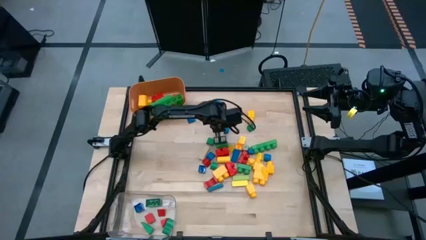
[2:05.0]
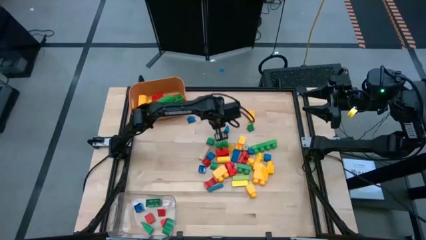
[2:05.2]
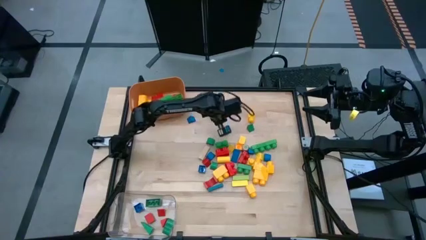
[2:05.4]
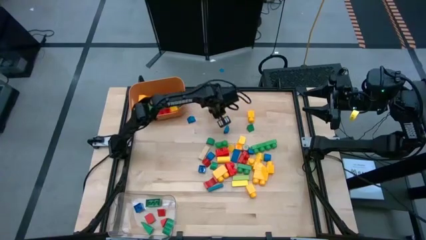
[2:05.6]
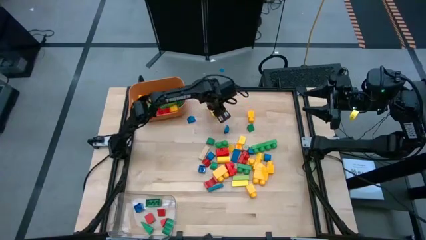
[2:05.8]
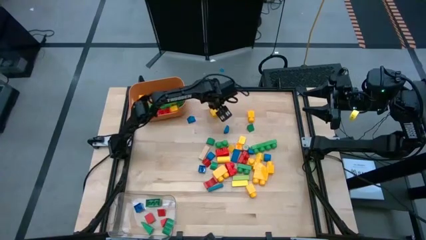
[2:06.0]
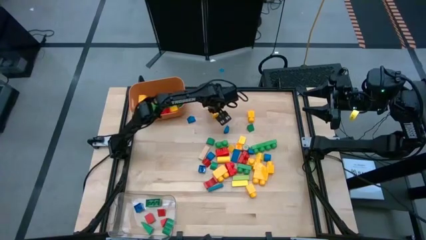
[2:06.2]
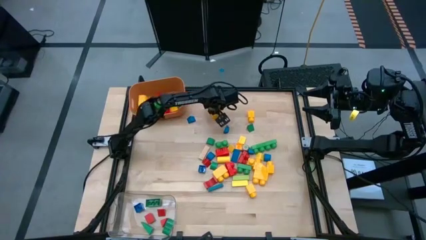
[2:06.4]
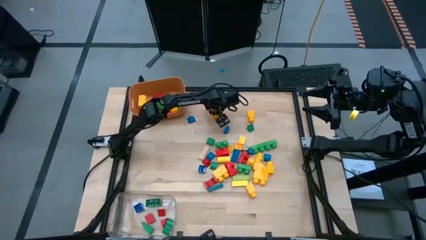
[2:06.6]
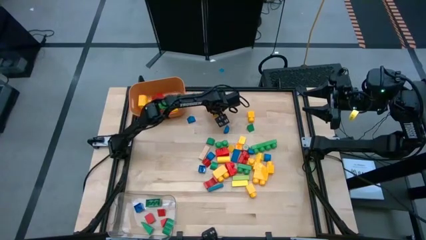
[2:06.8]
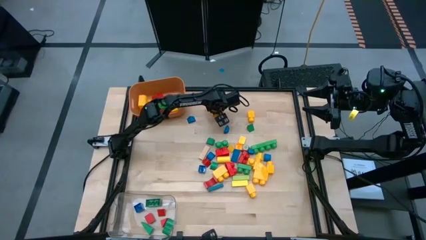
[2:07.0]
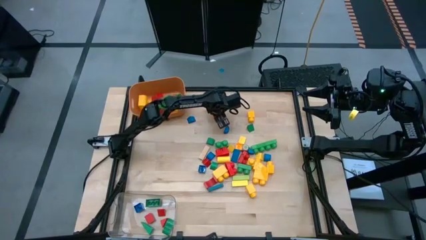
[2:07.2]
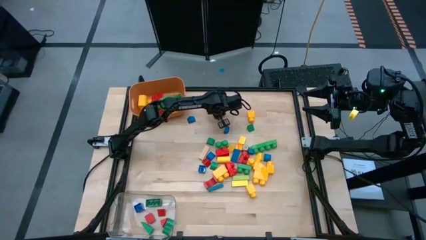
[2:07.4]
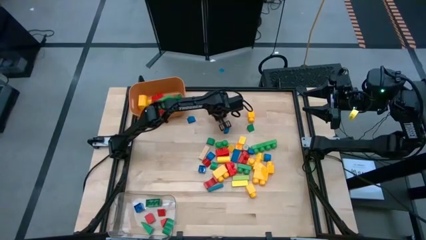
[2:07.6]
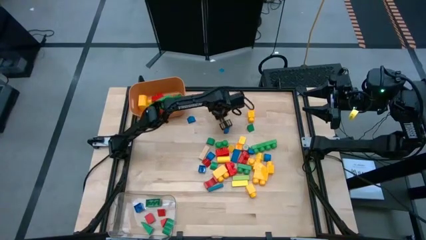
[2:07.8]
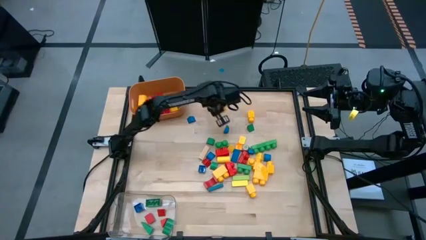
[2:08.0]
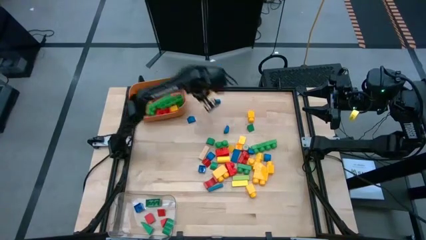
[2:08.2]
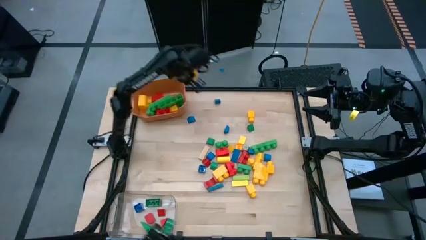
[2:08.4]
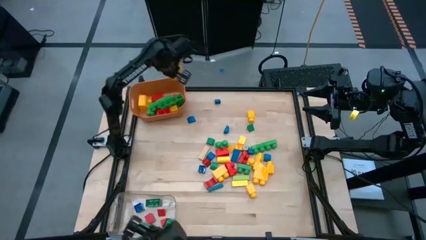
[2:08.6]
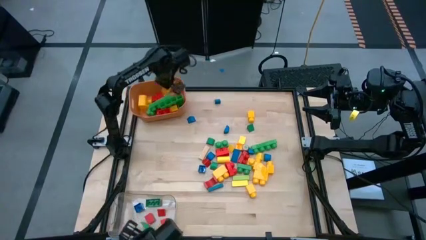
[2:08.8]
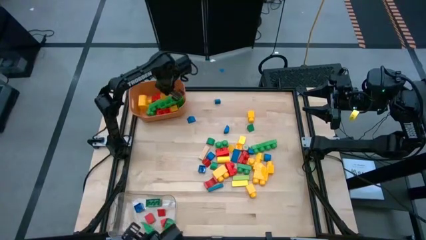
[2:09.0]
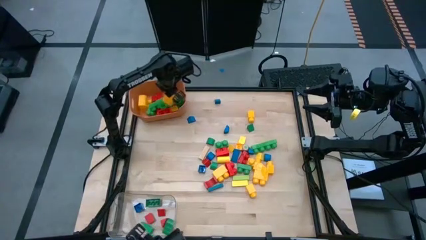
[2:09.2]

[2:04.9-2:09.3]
Task: Sort blocks by size
Put the big yellow game piece into the orange bin

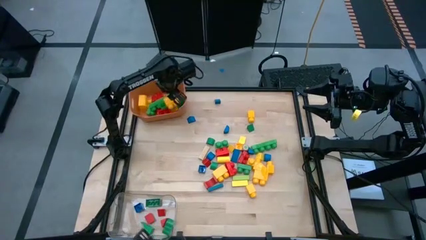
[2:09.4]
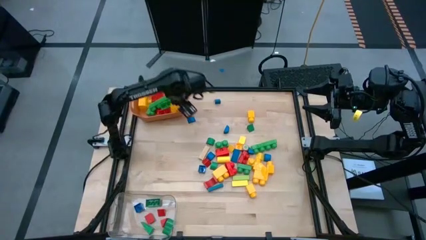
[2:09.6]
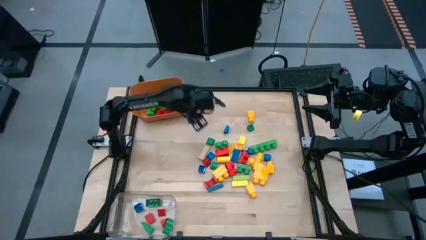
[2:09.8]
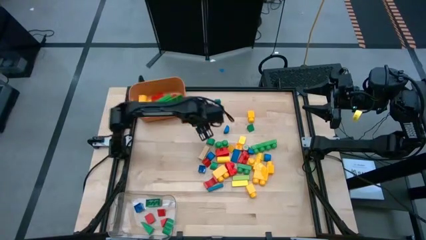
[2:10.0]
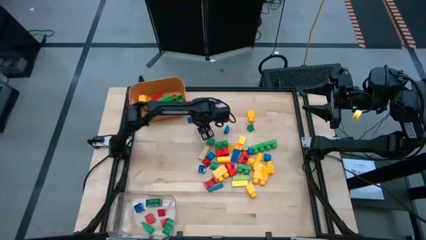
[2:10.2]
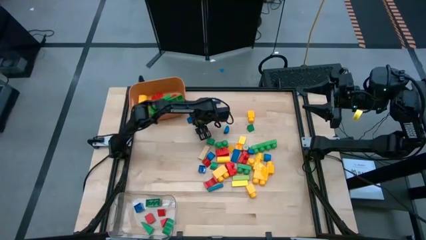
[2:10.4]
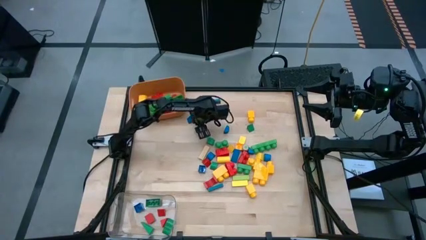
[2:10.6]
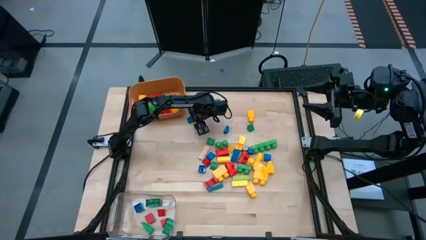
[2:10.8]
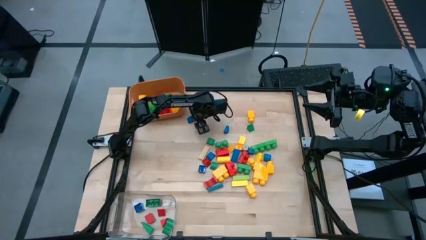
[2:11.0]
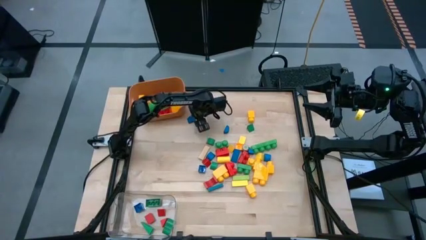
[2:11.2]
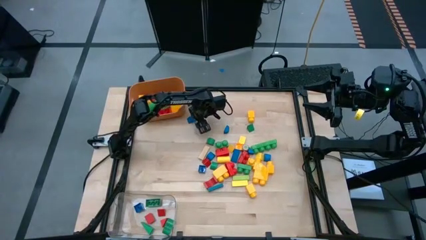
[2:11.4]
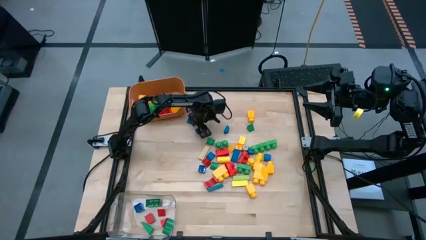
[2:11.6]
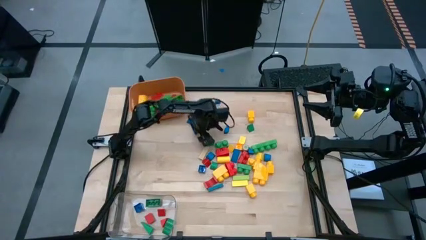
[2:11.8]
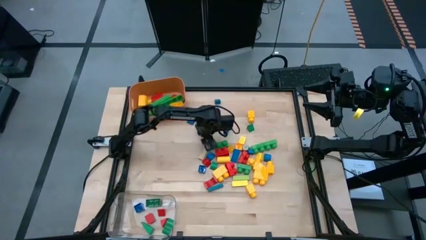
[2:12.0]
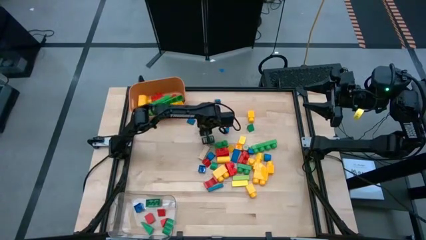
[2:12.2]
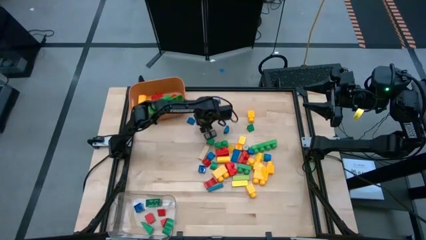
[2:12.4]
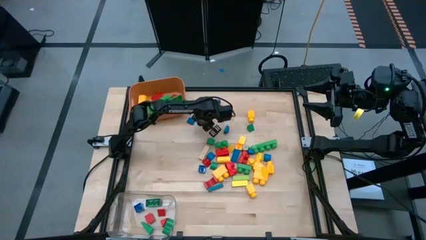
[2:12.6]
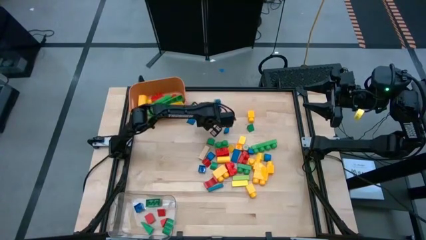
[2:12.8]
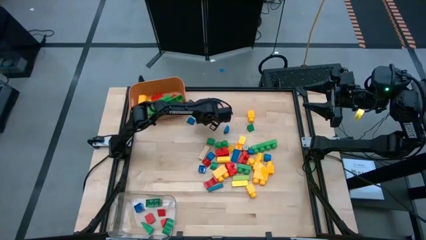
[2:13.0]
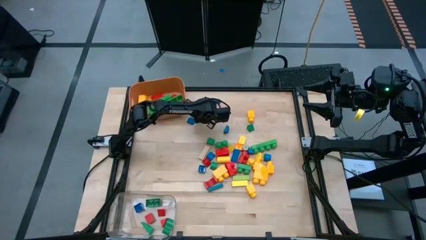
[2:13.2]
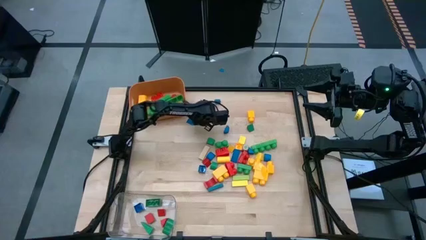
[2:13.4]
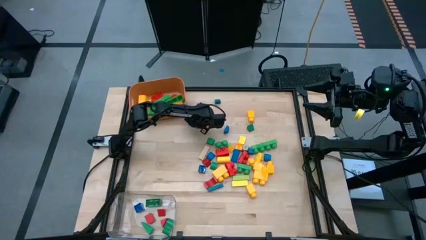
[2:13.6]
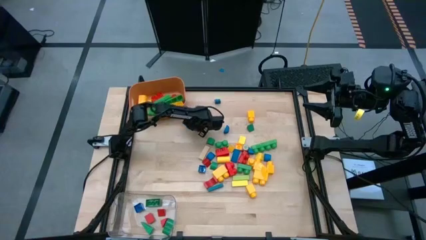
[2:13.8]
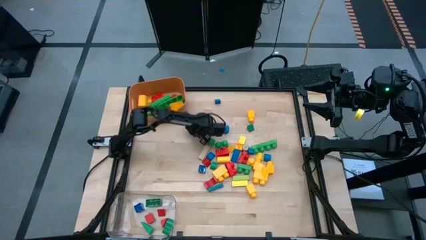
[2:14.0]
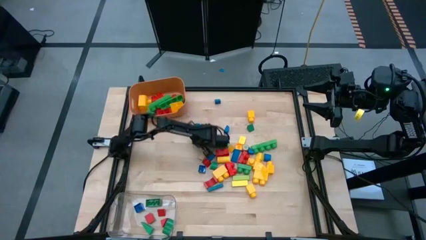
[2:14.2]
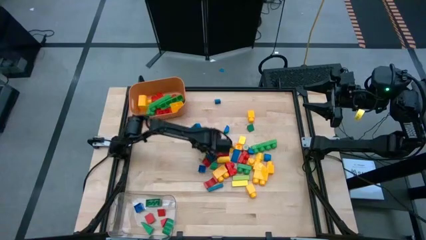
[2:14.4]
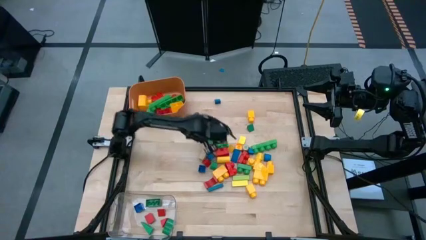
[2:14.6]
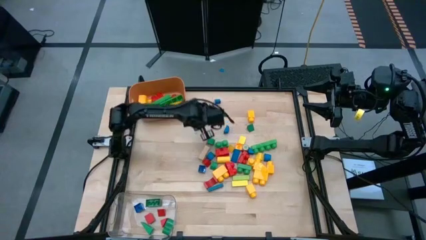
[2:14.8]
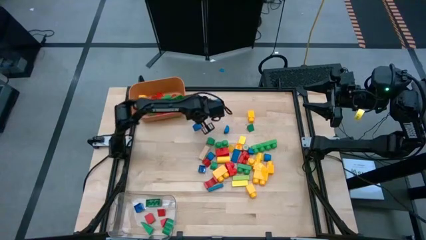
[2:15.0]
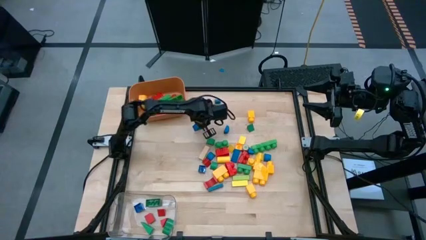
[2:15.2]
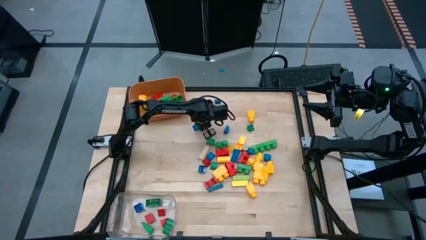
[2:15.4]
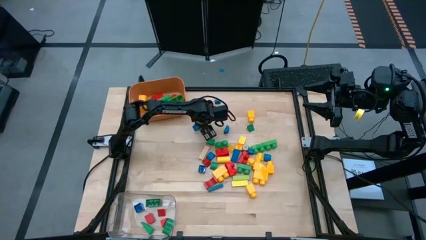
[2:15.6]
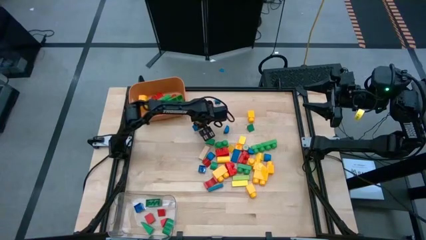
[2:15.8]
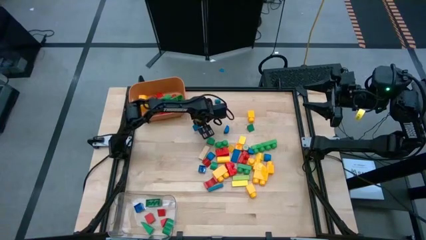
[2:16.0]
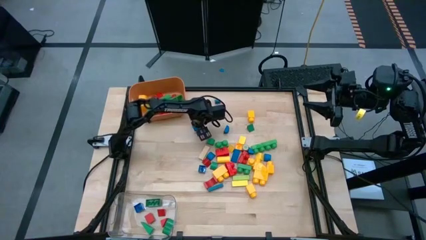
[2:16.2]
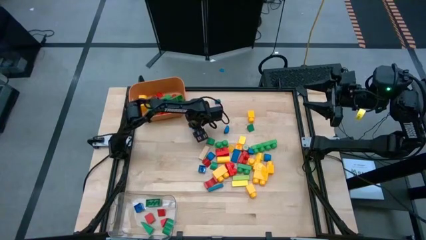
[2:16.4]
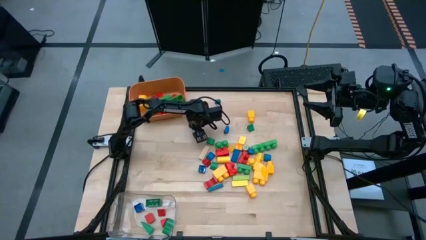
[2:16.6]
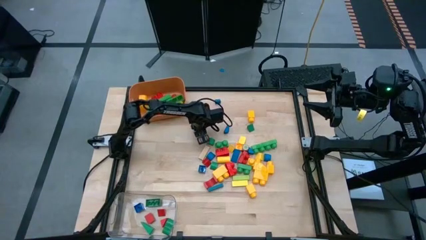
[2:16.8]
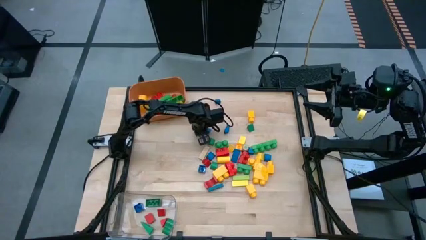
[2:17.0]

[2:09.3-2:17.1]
Put the small blue block into the transparent bin

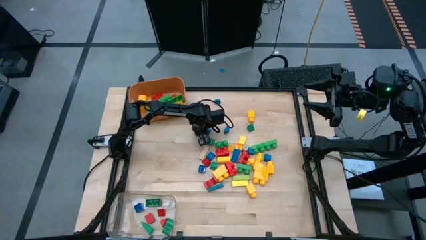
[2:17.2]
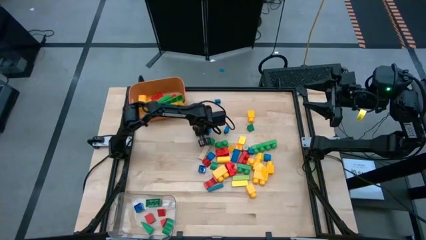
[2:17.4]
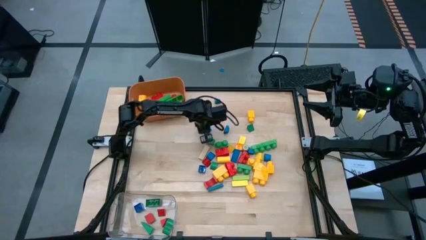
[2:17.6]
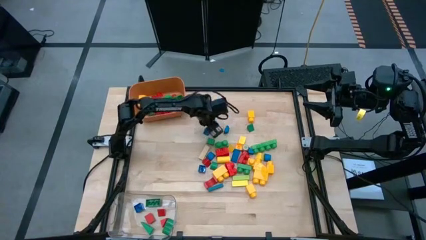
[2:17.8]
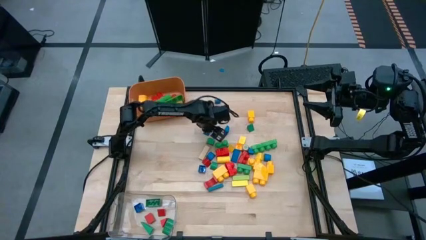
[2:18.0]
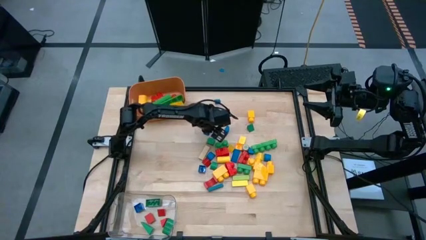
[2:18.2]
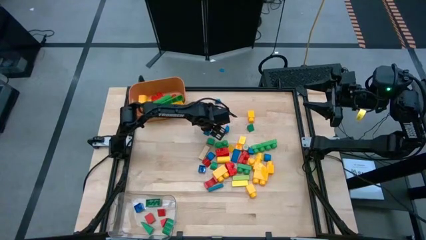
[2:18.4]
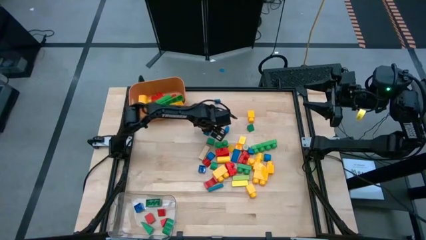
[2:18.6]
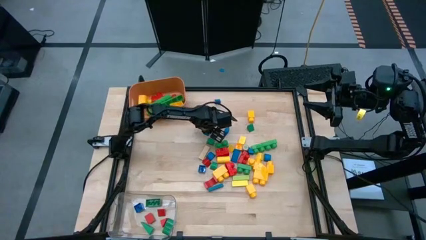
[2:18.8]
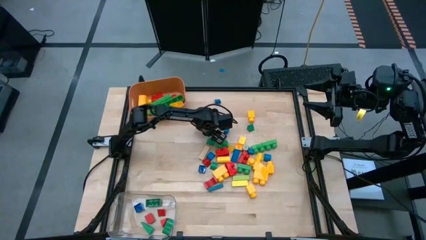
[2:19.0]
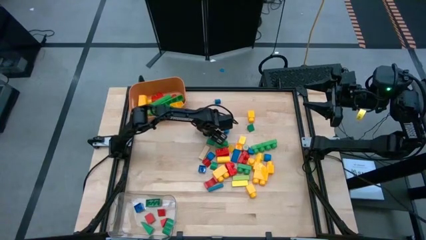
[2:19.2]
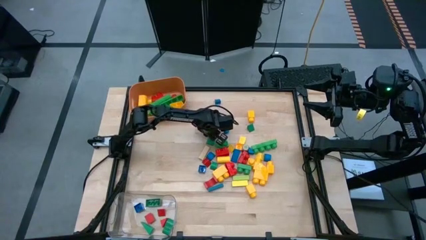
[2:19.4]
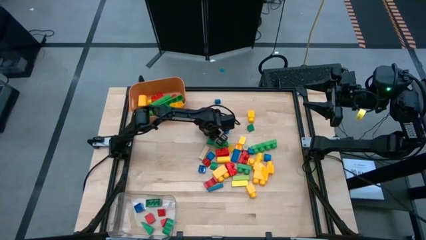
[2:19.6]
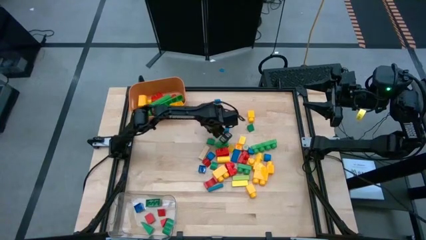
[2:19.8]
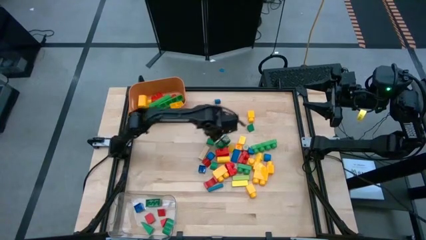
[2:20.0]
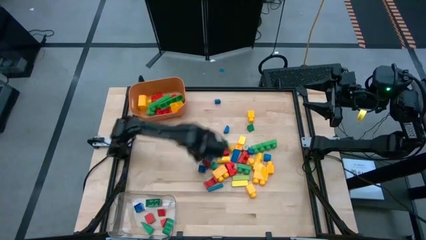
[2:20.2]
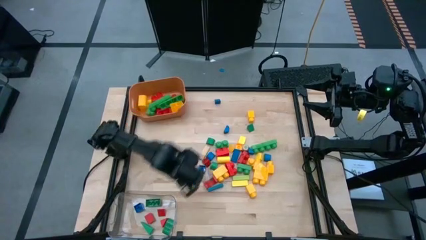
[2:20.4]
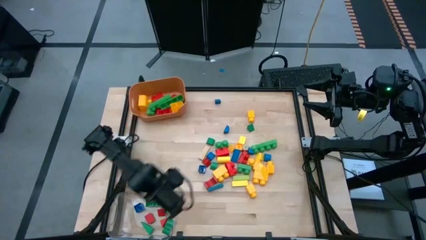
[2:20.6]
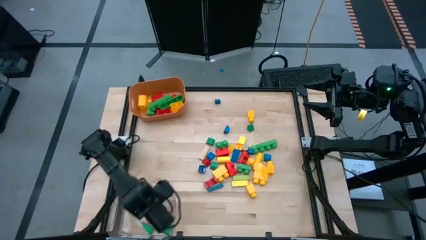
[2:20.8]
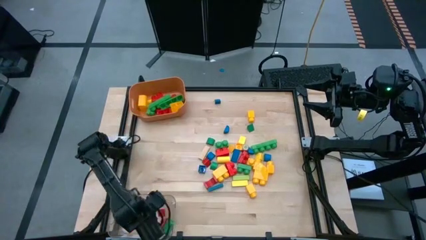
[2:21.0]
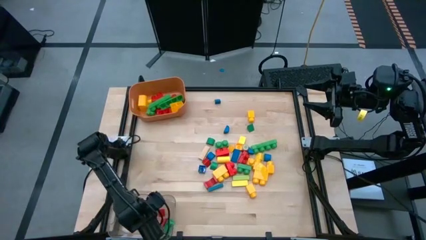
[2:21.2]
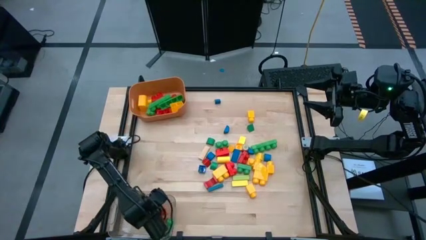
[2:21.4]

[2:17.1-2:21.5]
Put the small blue block into the transparent bin

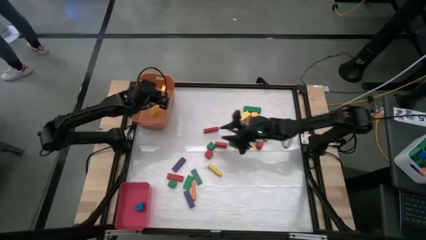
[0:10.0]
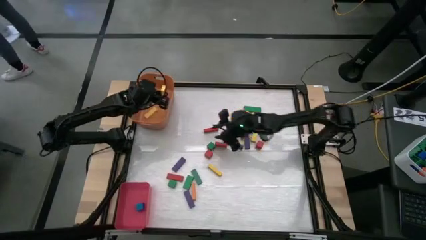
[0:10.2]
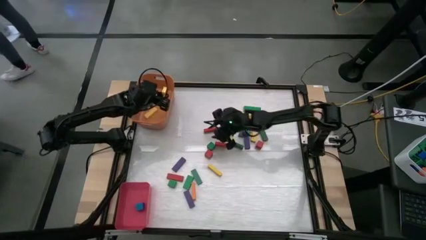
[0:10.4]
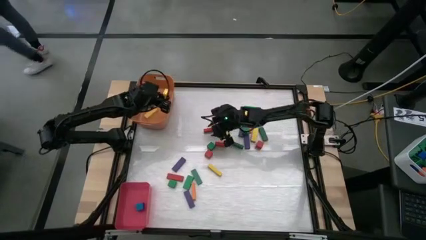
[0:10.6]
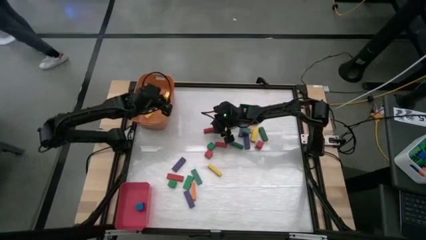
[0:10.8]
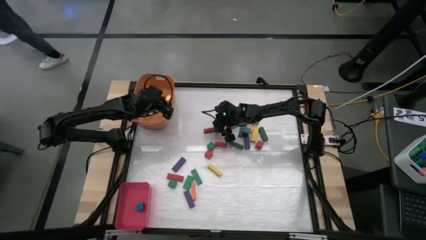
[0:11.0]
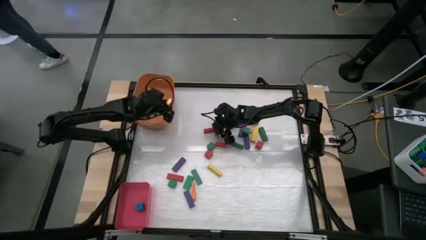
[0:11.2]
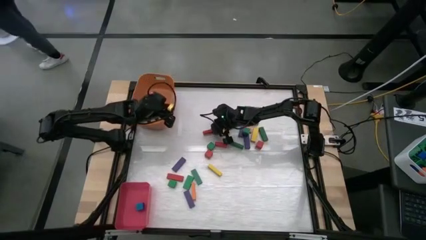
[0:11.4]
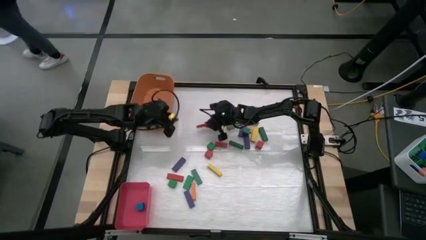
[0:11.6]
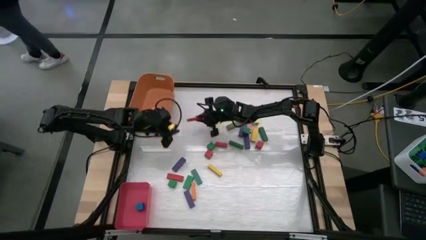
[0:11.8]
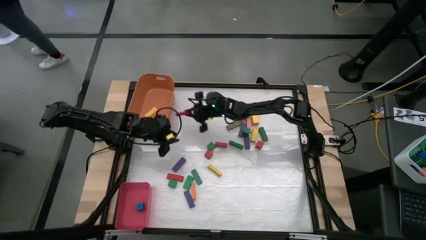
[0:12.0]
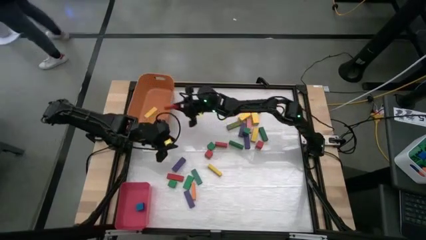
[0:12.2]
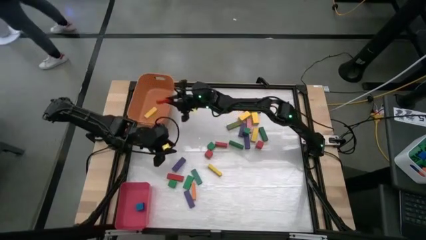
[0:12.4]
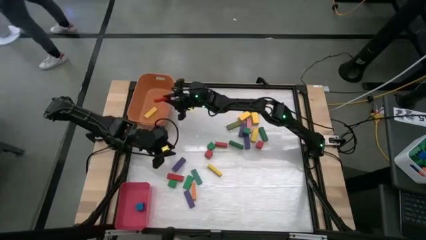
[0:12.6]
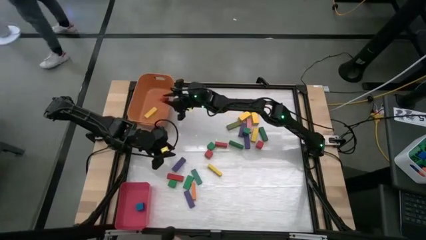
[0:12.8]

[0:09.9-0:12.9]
Task: Sort blocks by size
Put the big red block into the orange bin
